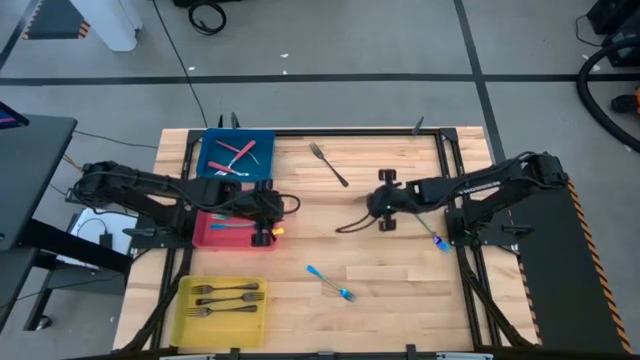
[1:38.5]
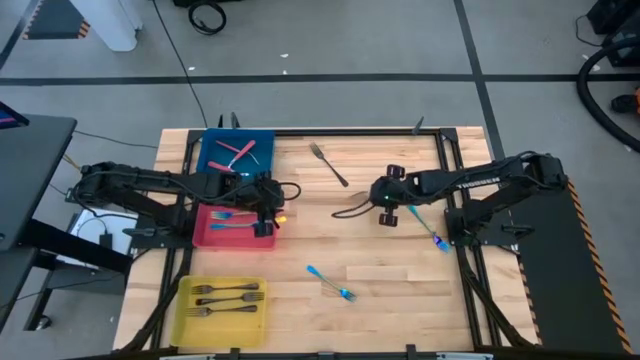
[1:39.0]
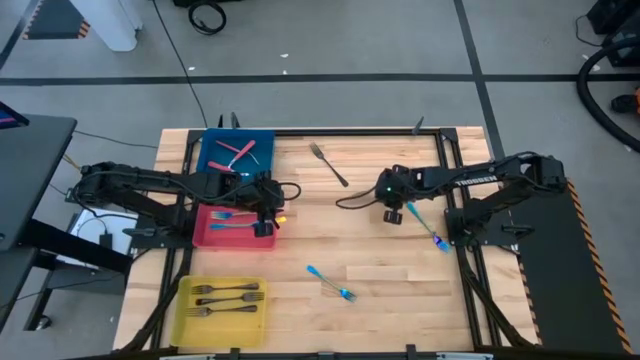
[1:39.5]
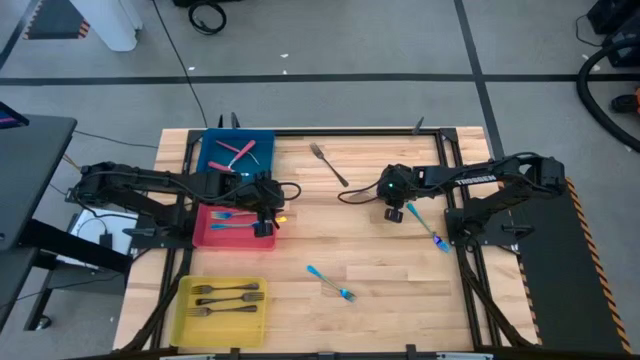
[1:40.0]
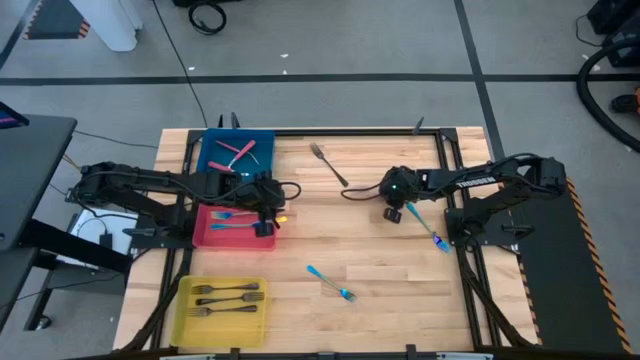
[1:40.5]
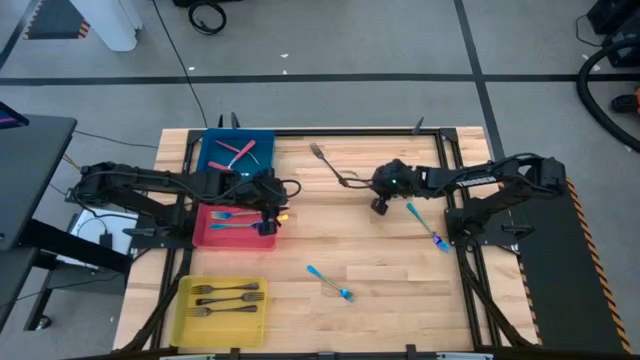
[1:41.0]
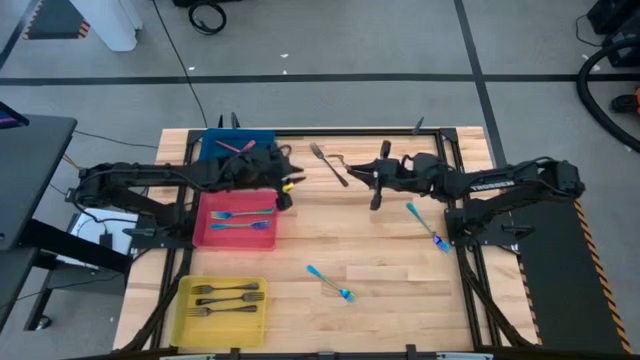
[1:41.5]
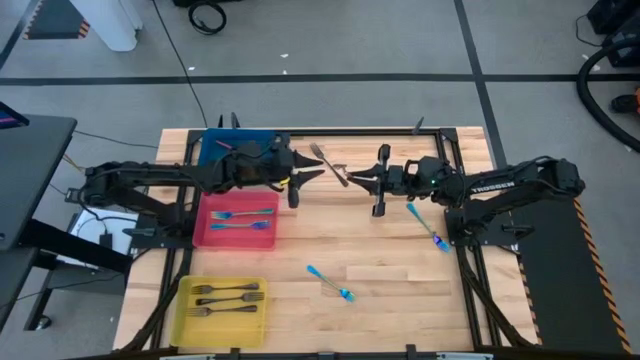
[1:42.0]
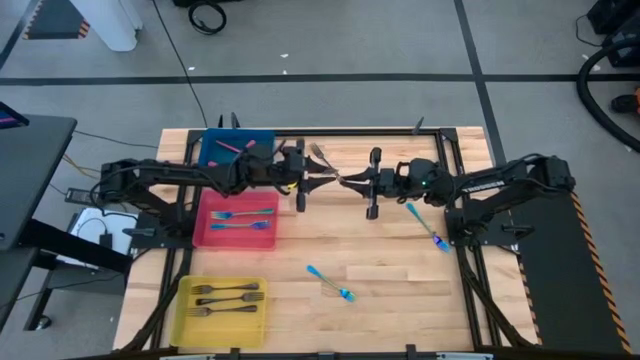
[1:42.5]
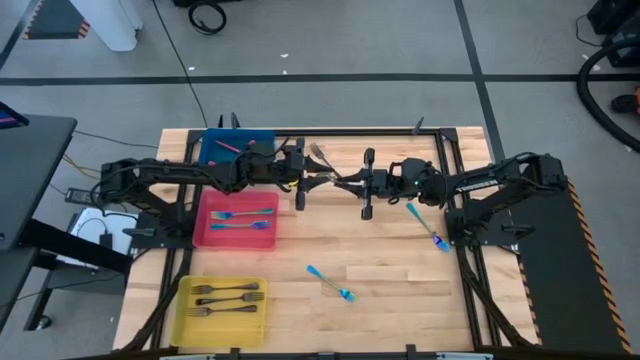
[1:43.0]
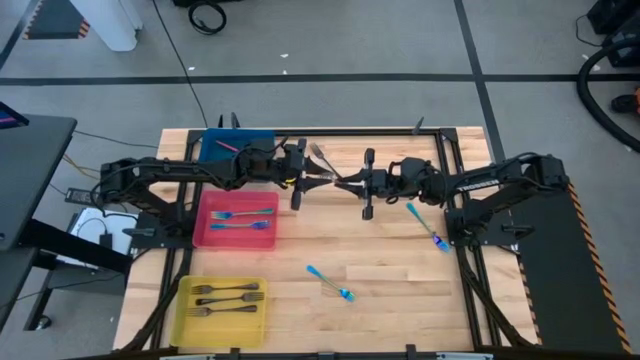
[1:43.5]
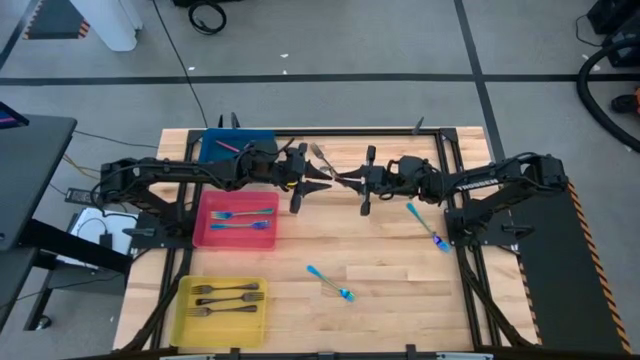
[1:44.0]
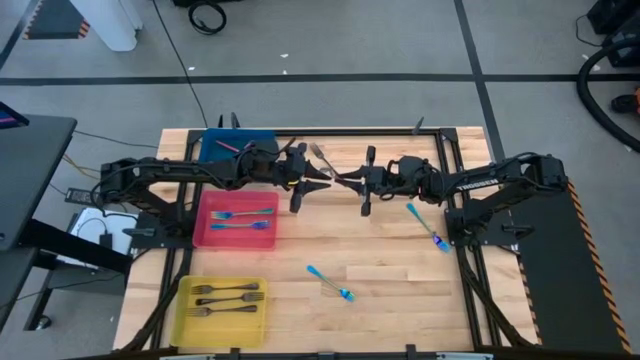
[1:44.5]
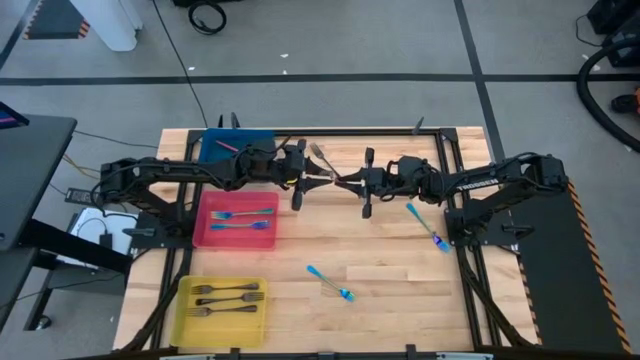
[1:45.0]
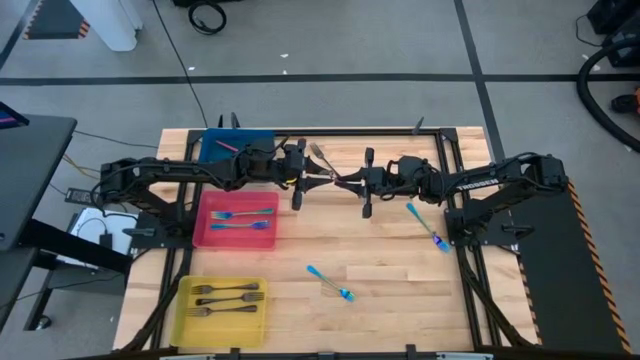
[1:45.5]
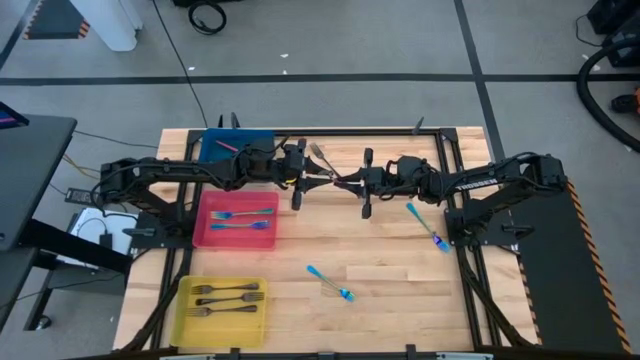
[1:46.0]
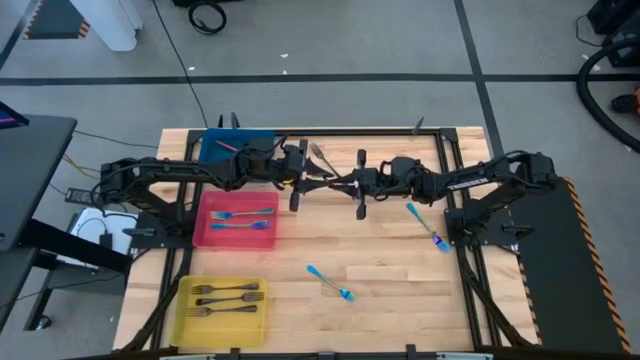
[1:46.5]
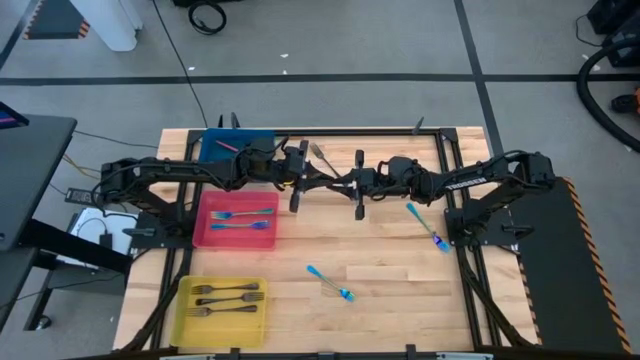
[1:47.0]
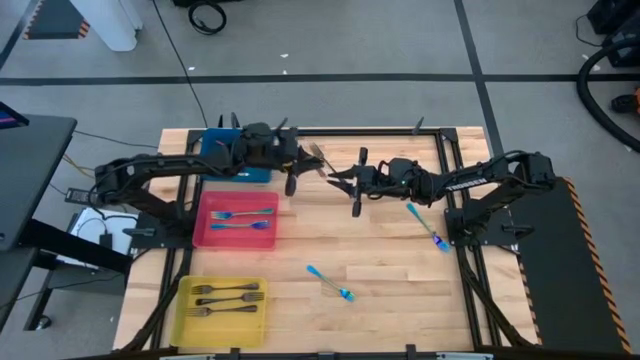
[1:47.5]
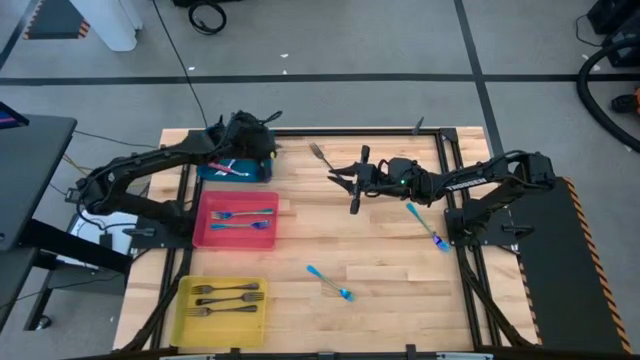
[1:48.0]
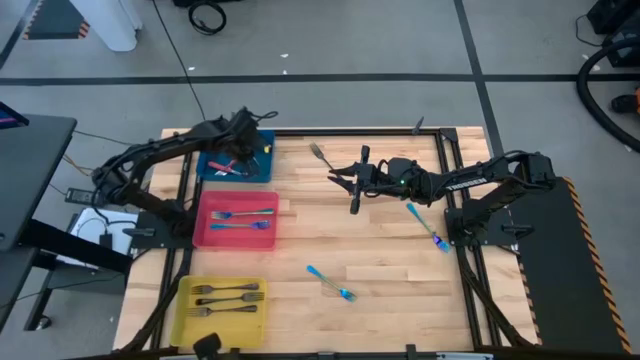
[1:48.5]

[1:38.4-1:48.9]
Task: Sort silverware by color (type)
Put the pink fork into the blue bin

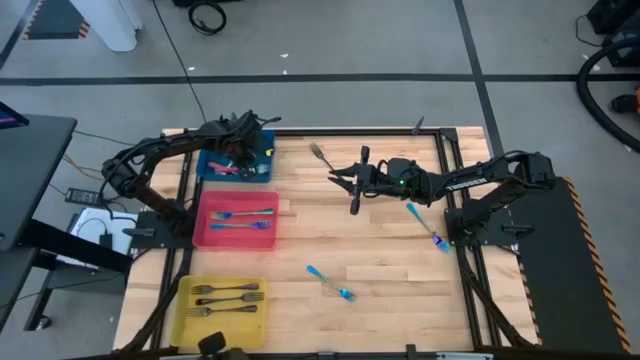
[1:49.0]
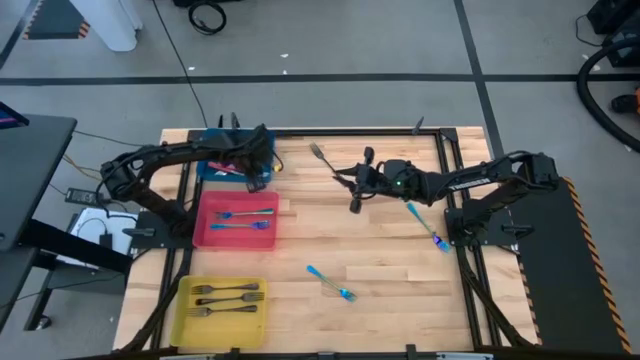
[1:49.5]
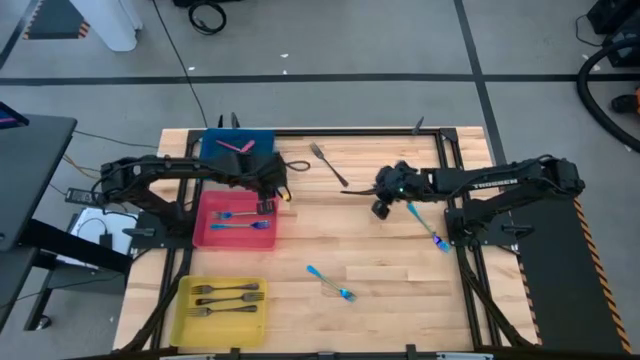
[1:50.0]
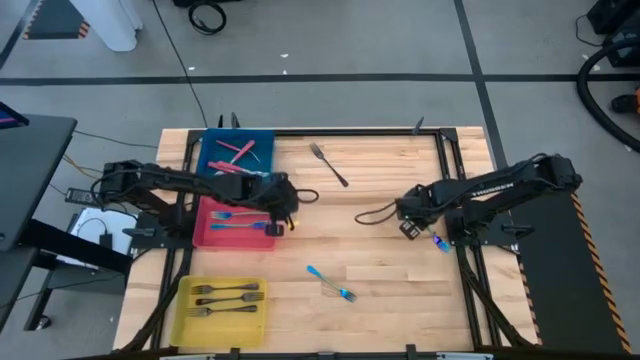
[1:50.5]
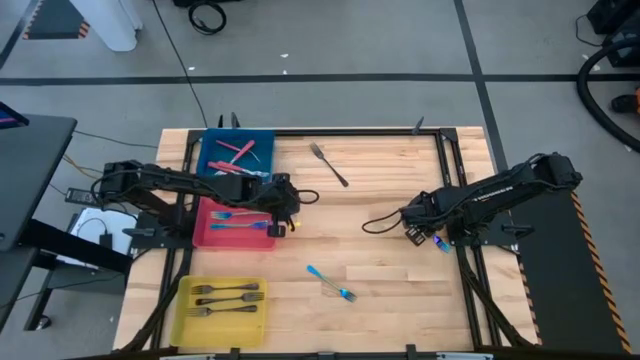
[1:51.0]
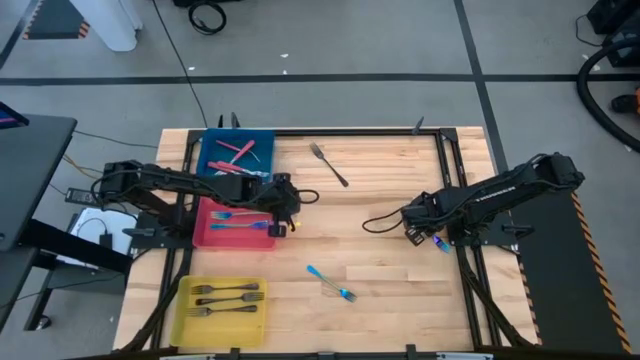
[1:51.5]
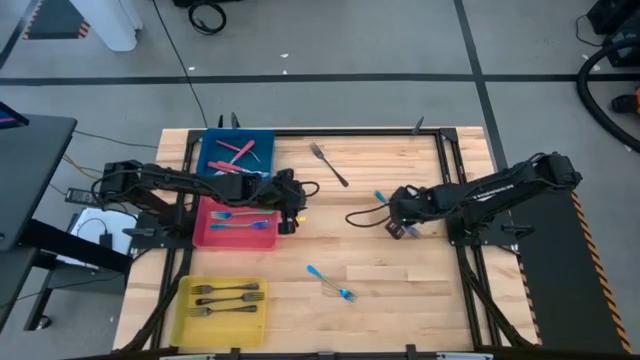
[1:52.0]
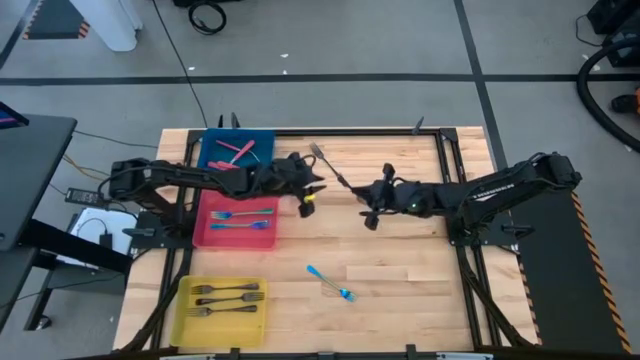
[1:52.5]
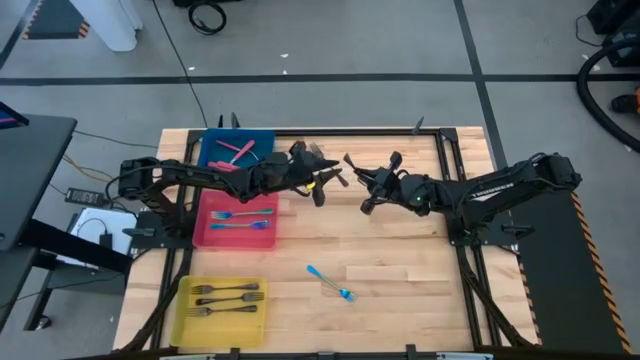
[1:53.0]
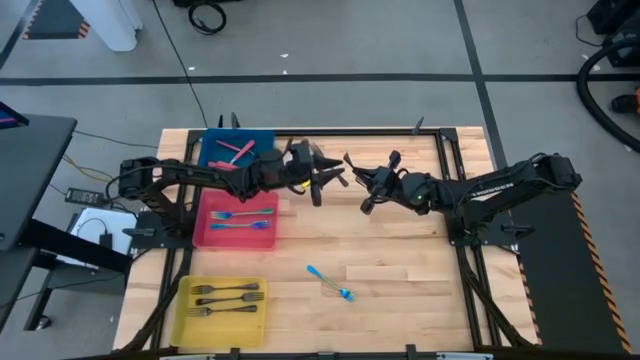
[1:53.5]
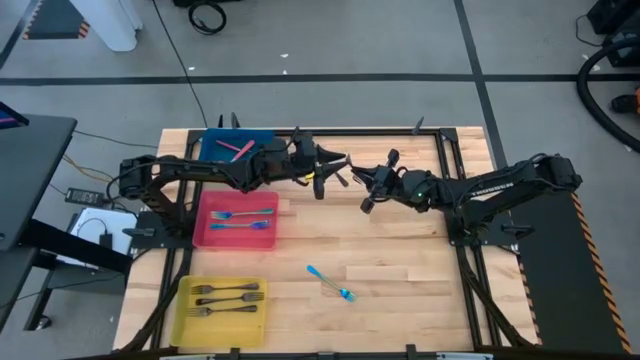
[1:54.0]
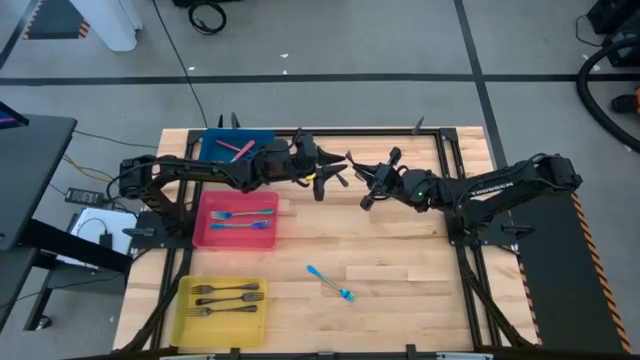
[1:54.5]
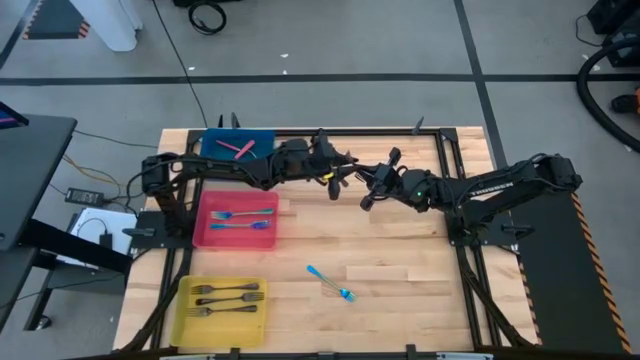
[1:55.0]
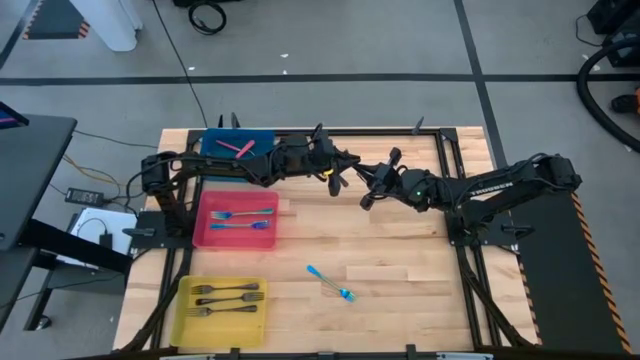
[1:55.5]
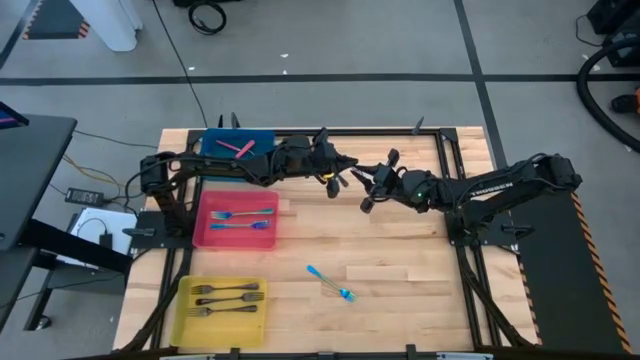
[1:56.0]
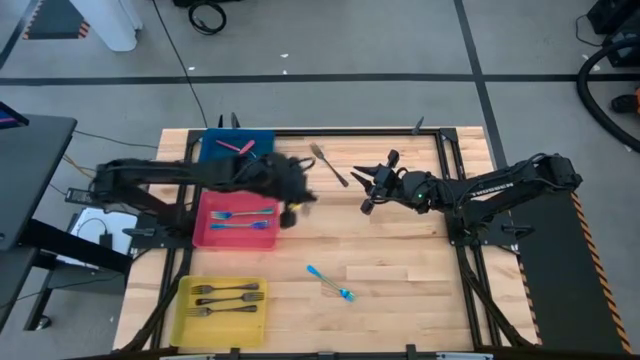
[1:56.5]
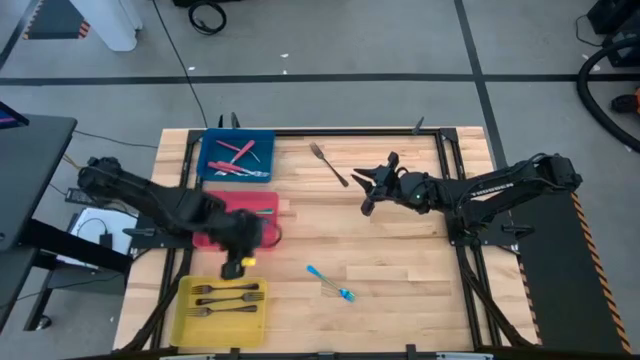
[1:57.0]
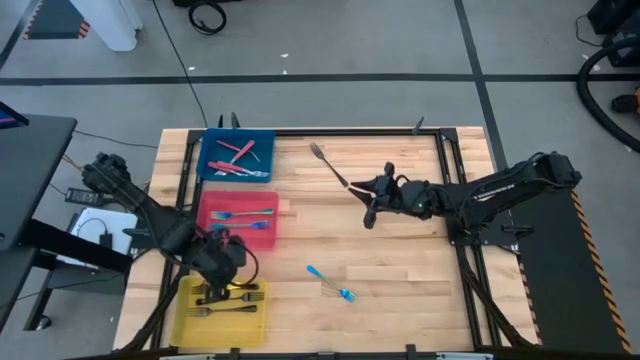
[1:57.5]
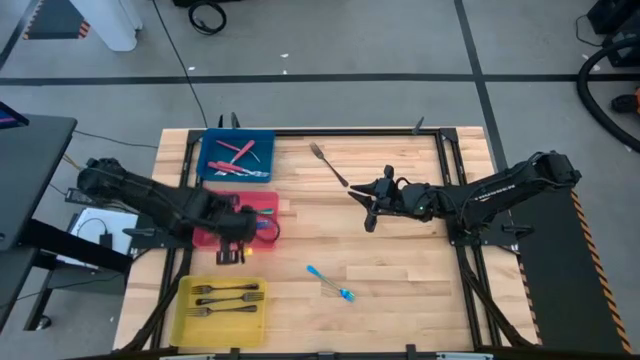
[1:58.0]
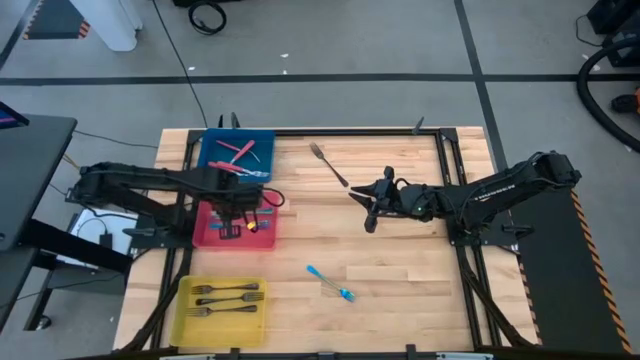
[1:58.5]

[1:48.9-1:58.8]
Put the right light blue fork into the red bin

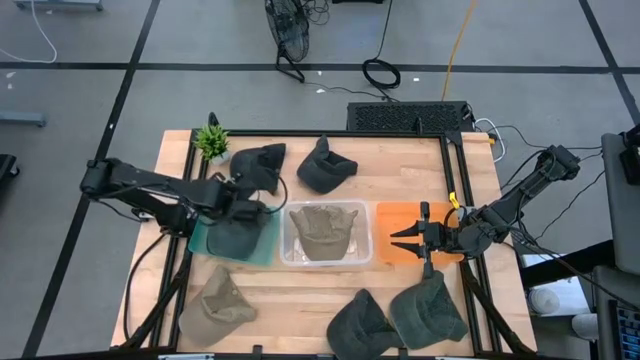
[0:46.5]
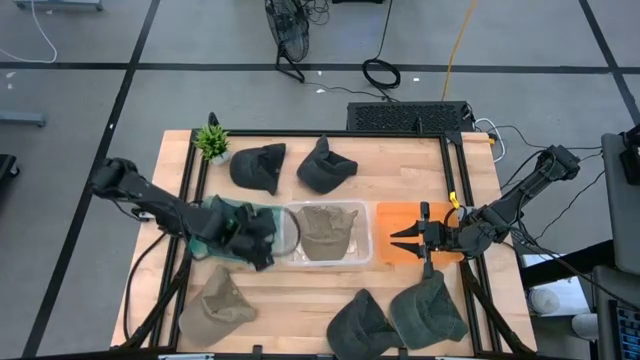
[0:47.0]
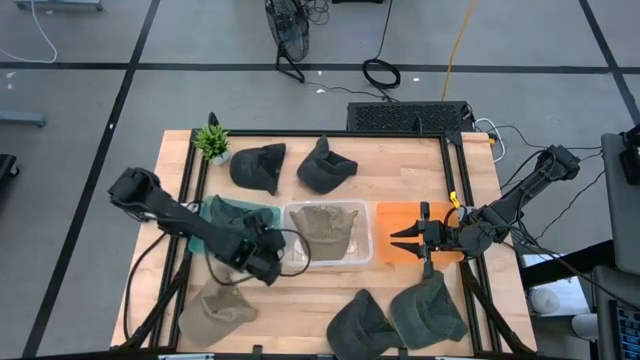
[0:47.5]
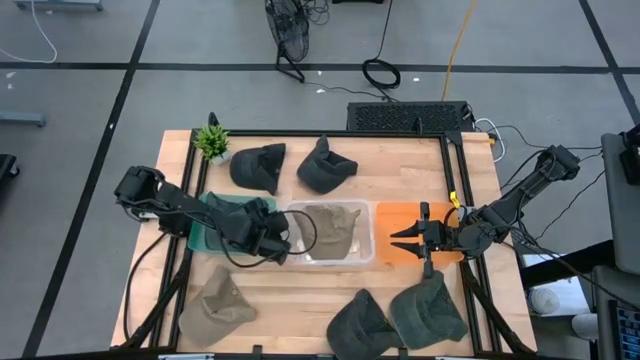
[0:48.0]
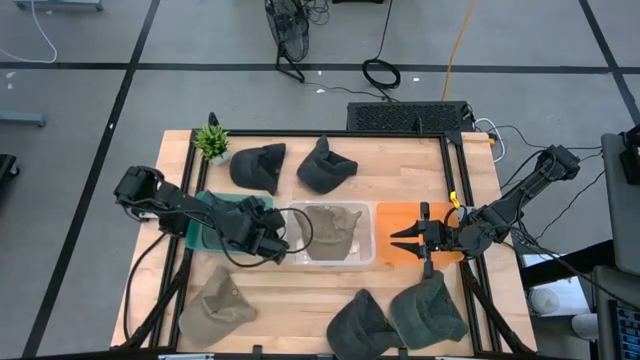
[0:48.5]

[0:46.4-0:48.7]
Task: Pick & Place hat
Adjust the green bin
